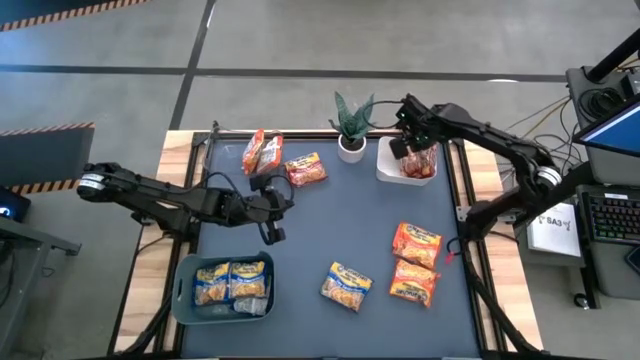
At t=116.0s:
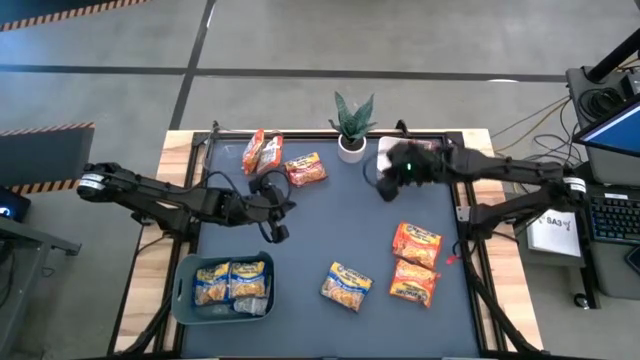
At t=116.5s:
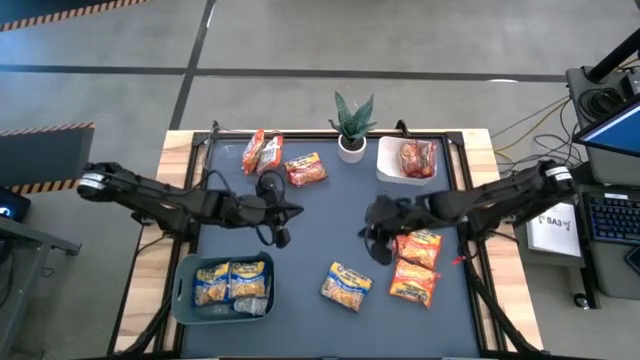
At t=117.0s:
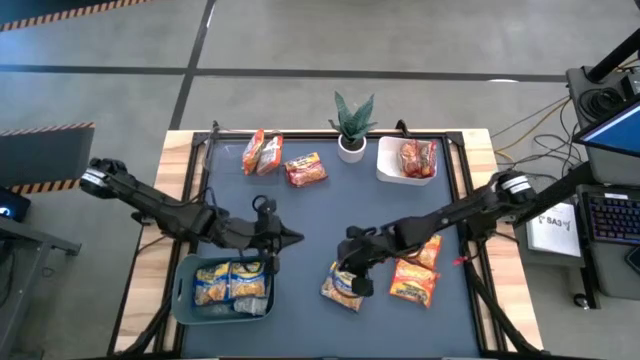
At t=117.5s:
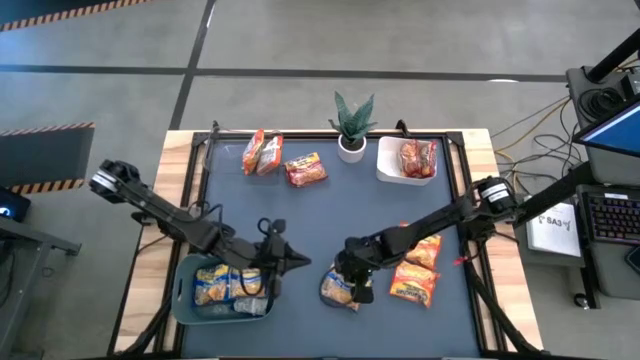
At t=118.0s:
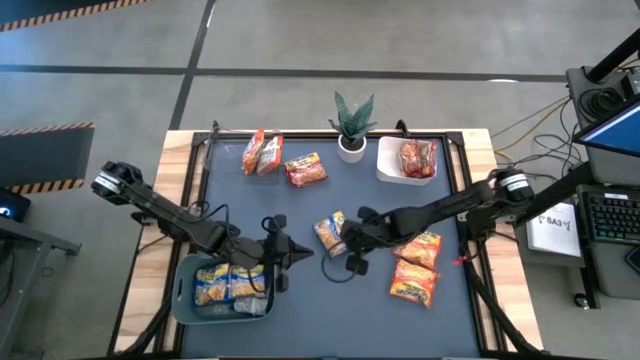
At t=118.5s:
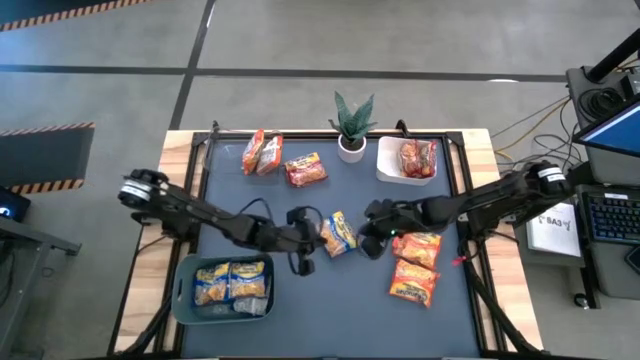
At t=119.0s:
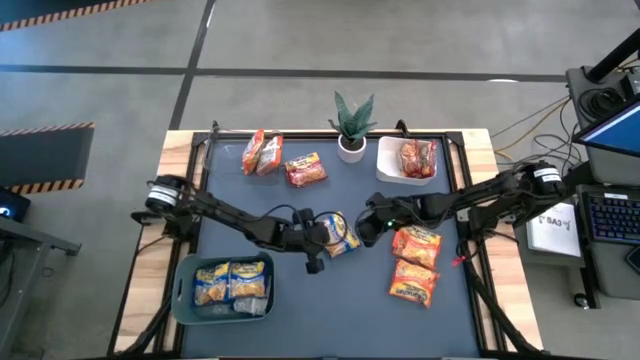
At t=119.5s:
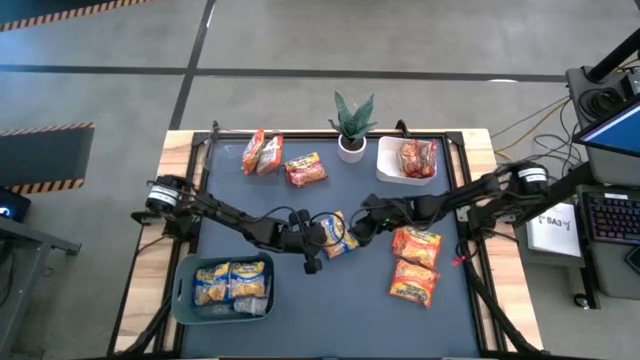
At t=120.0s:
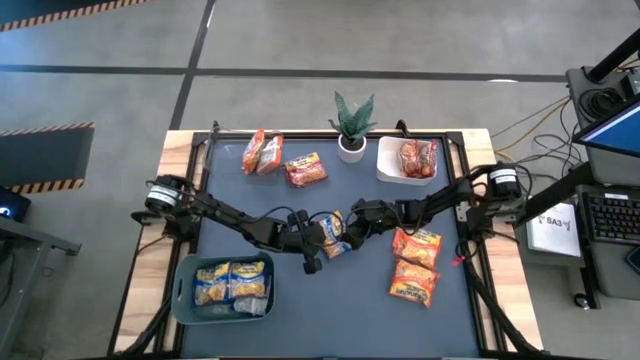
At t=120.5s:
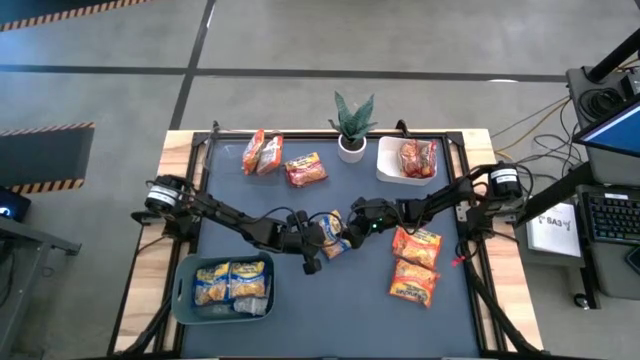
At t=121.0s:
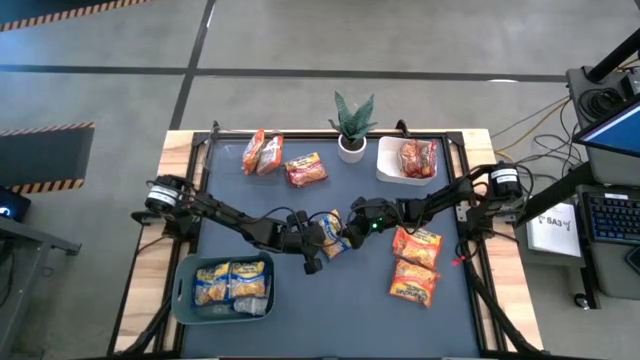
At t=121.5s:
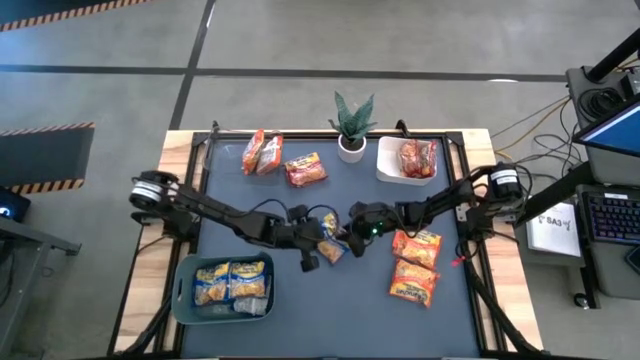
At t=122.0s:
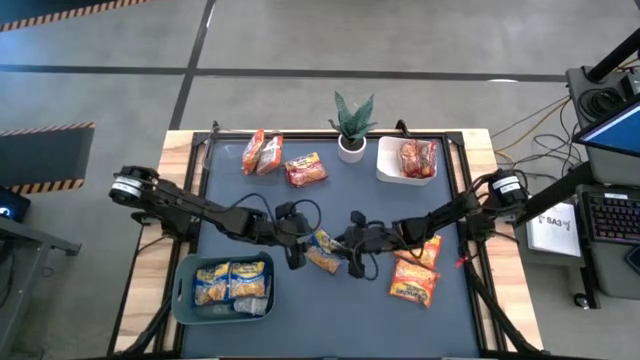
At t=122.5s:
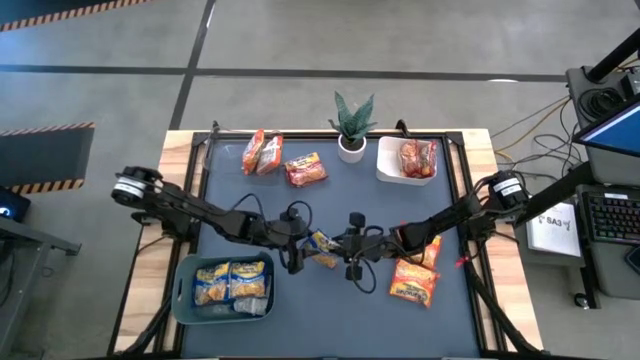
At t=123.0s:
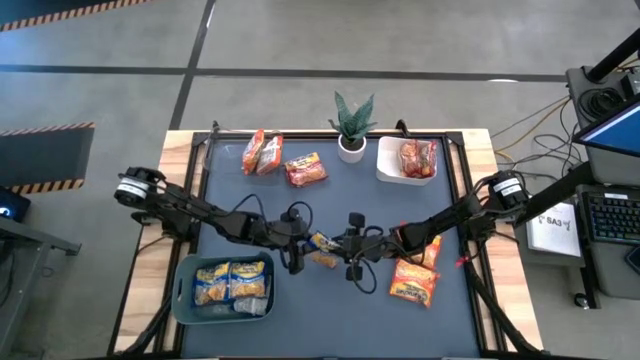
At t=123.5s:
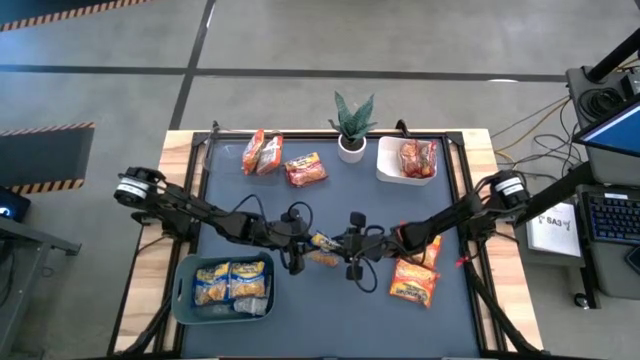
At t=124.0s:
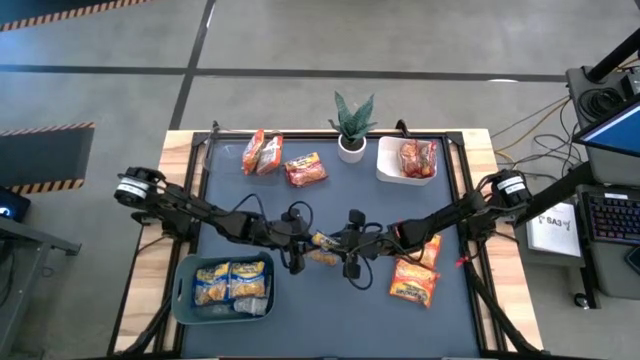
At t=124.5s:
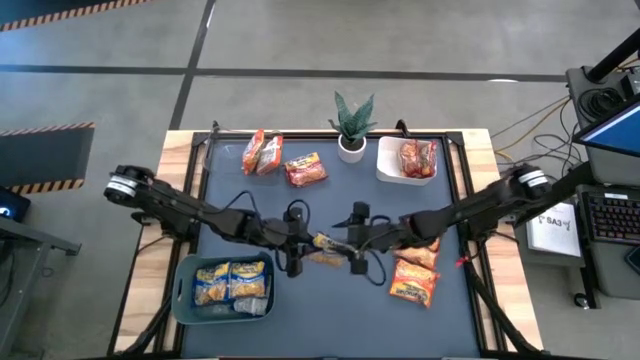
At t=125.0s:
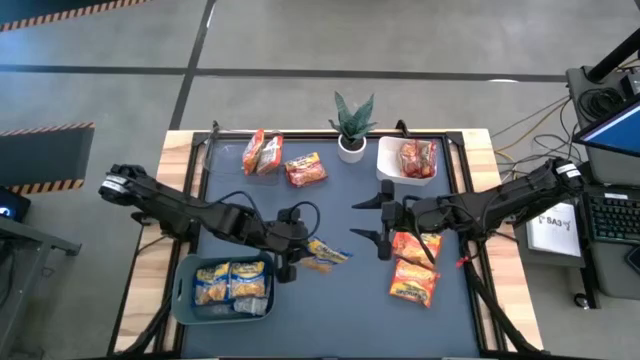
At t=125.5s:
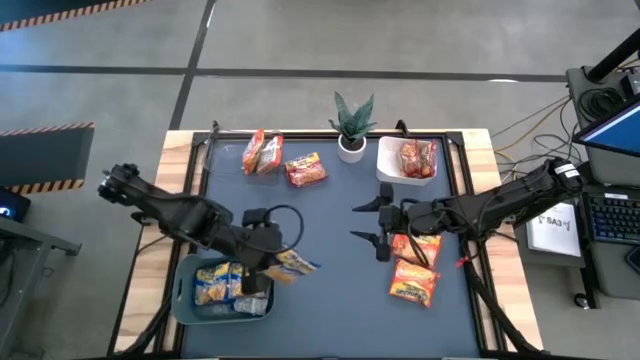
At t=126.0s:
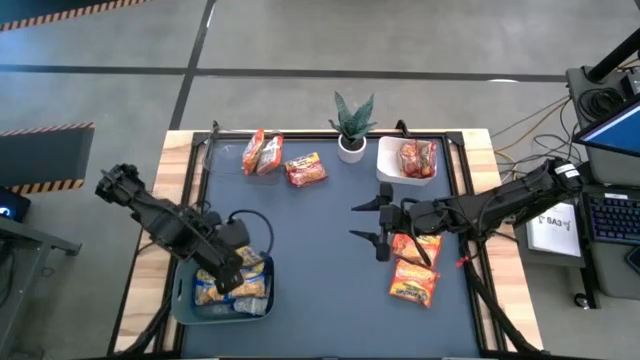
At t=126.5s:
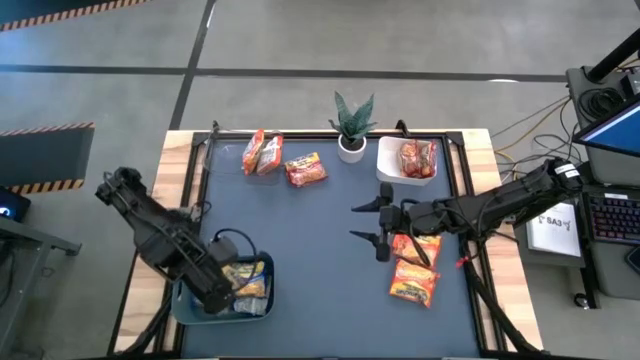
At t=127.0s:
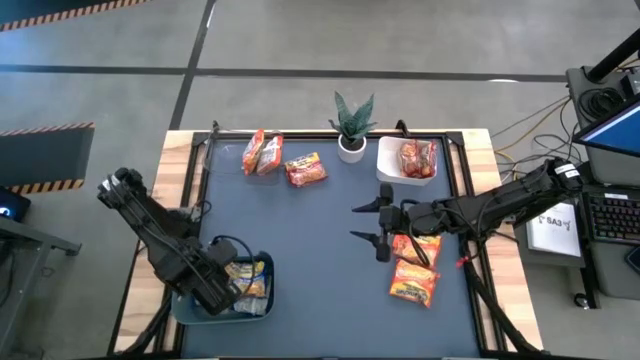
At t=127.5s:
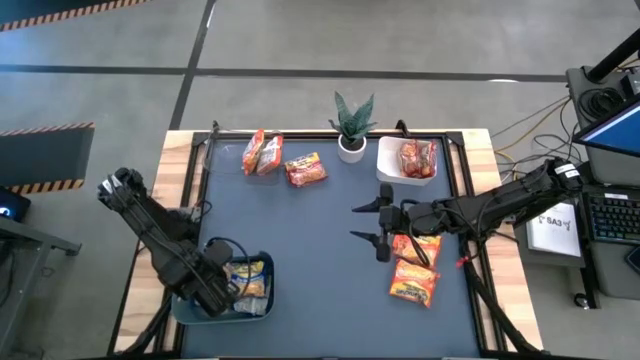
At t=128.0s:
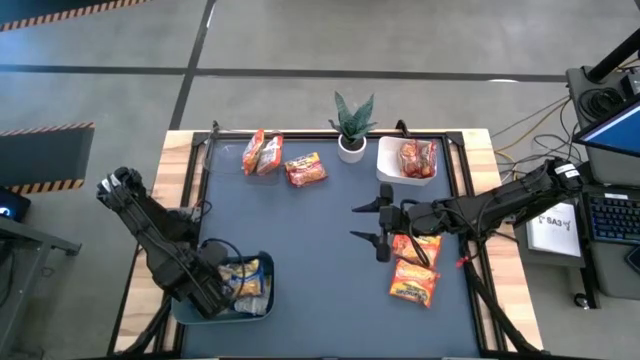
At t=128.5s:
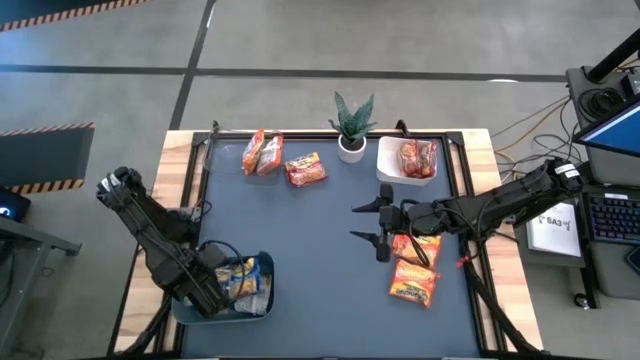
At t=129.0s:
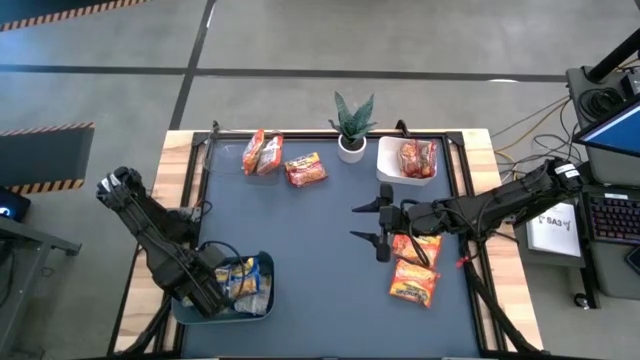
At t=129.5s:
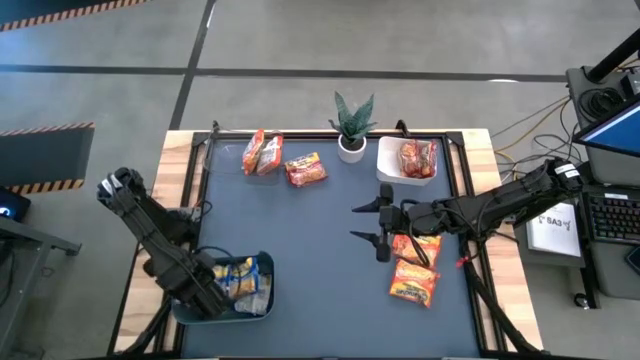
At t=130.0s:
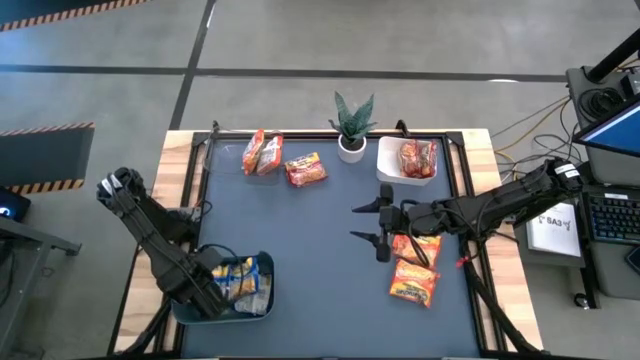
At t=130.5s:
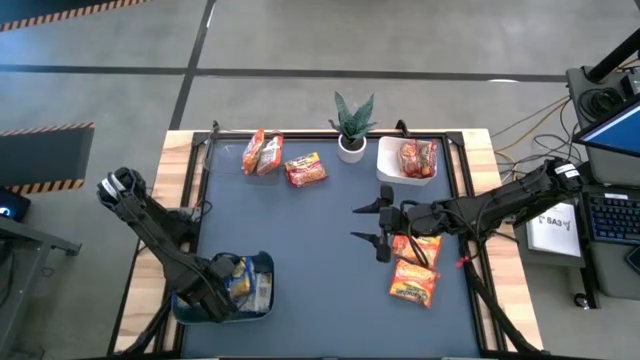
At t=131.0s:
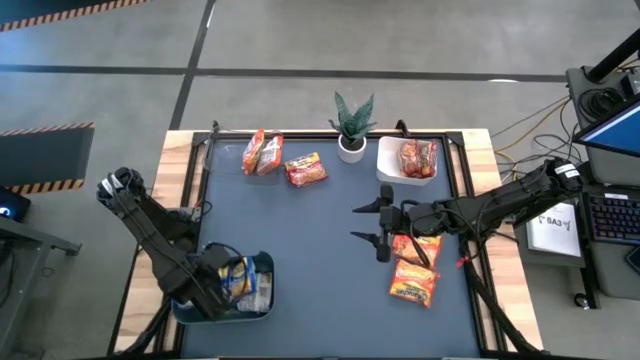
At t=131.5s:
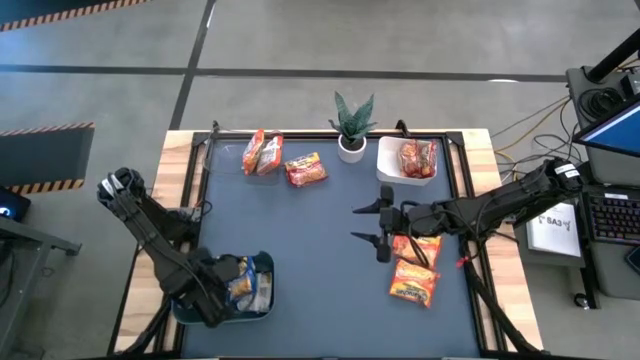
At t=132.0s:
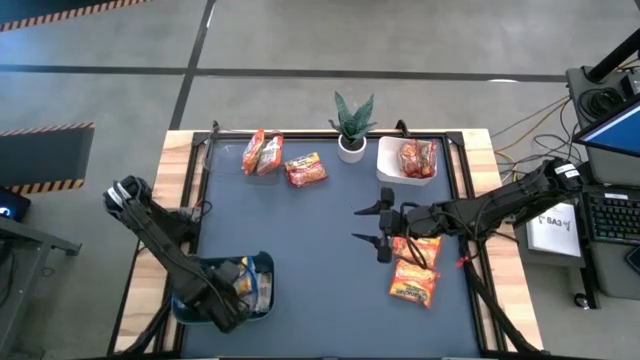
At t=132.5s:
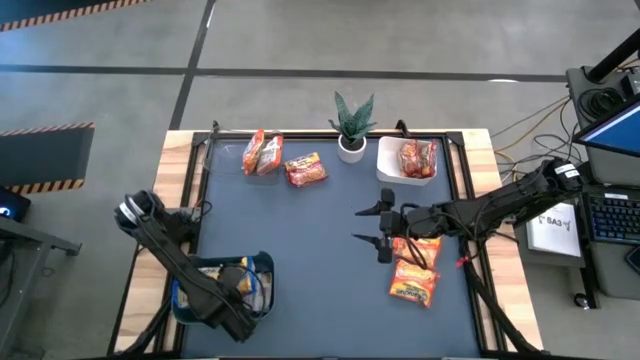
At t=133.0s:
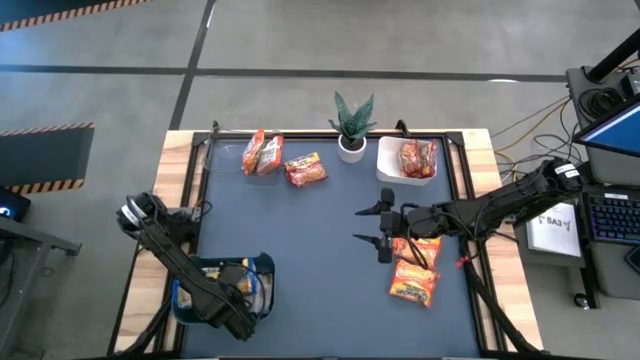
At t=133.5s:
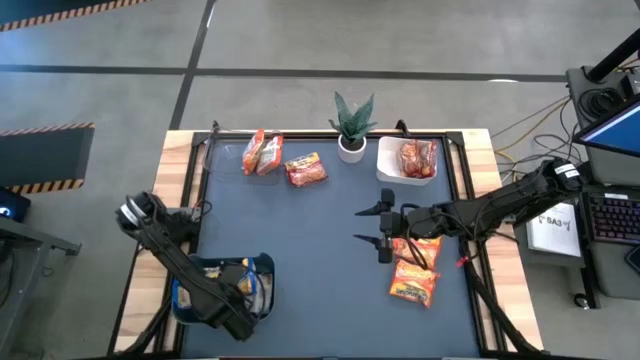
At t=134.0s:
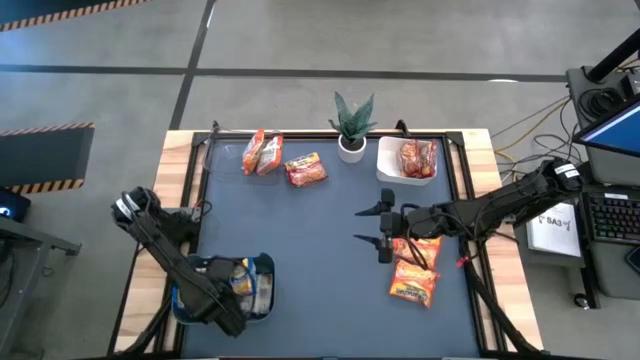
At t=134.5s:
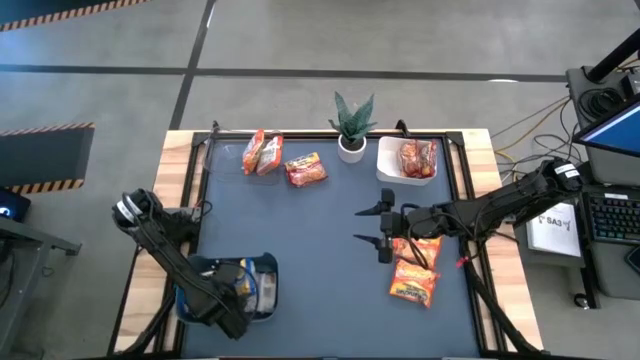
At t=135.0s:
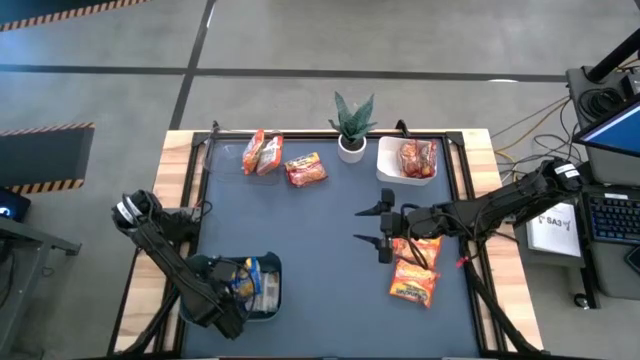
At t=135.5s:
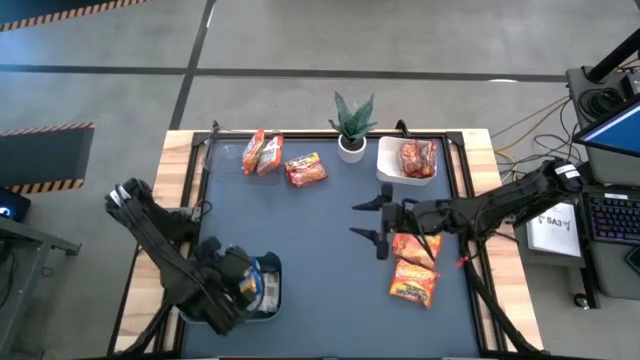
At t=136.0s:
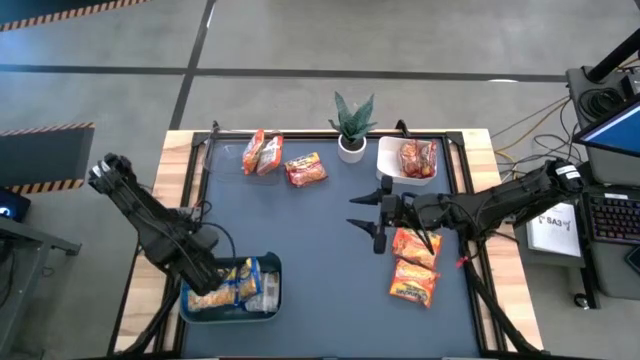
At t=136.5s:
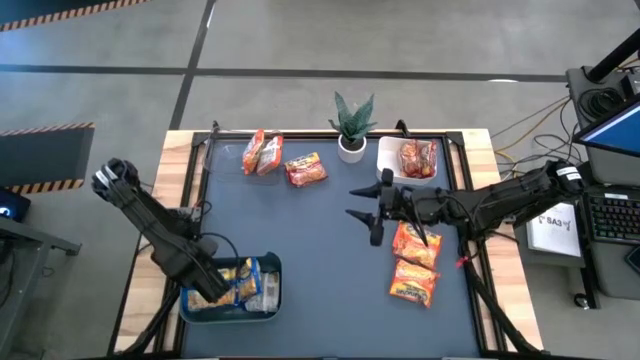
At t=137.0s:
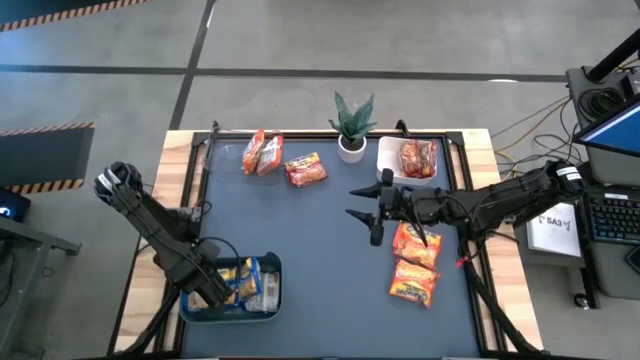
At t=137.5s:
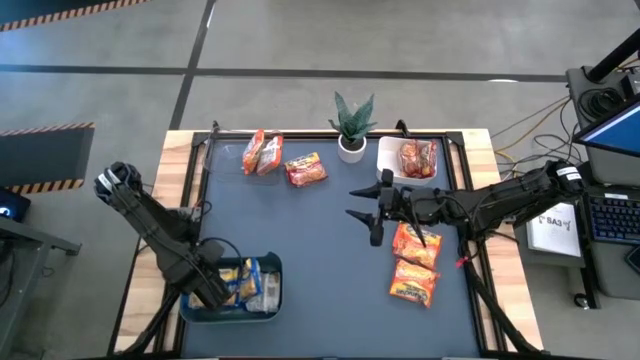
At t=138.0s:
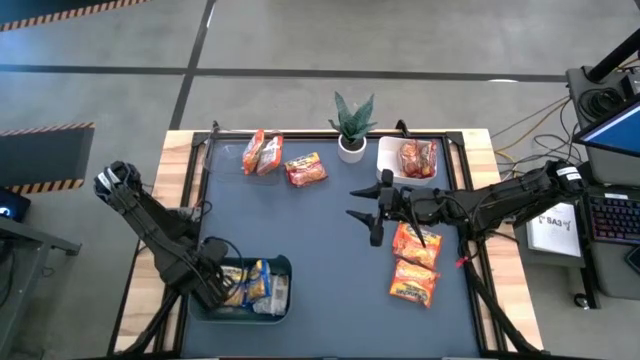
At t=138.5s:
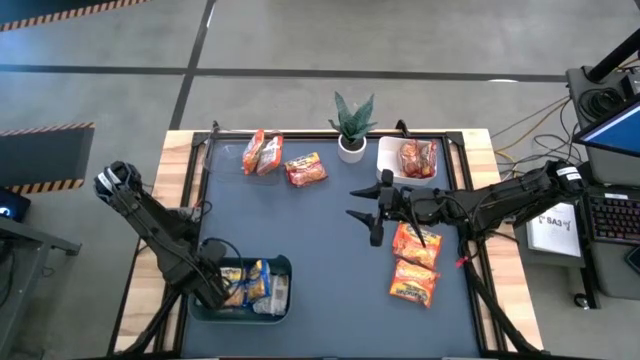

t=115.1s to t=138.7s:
Task: Sort Maruchan noodles
Put the blue noodle pack into the blue bin
